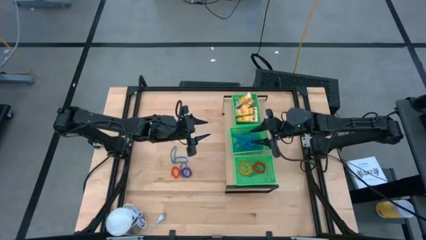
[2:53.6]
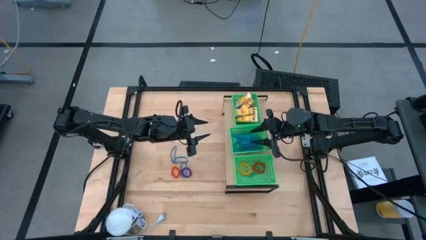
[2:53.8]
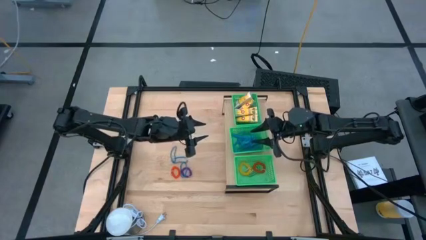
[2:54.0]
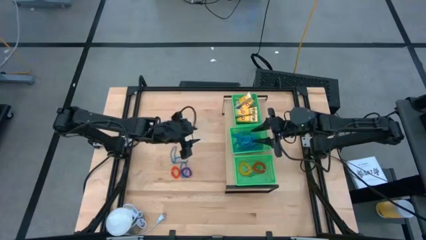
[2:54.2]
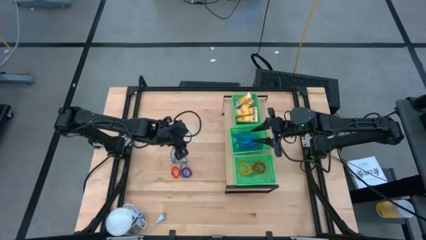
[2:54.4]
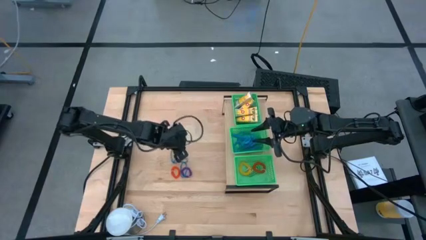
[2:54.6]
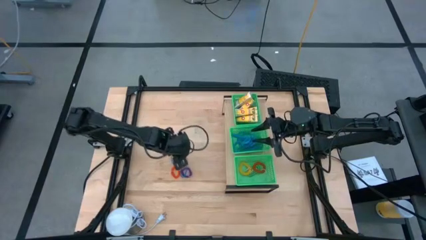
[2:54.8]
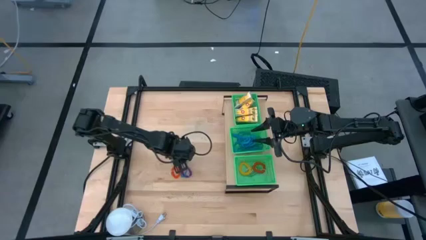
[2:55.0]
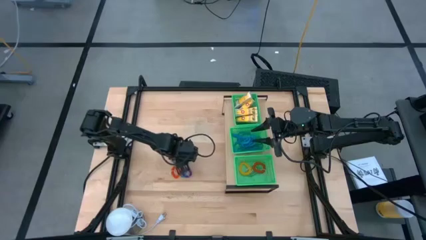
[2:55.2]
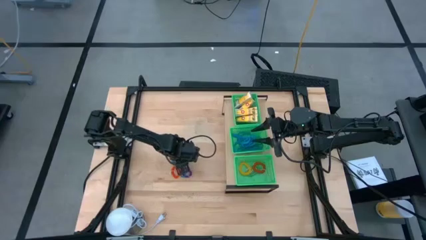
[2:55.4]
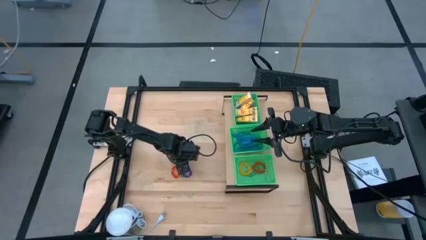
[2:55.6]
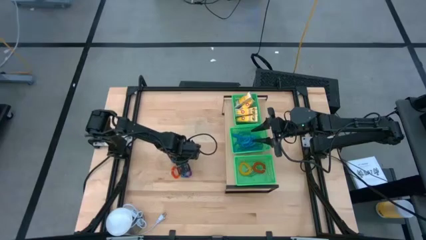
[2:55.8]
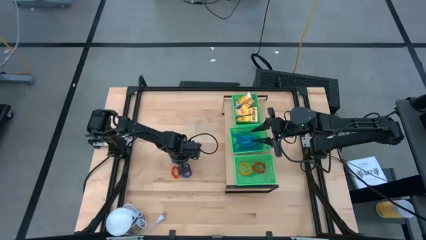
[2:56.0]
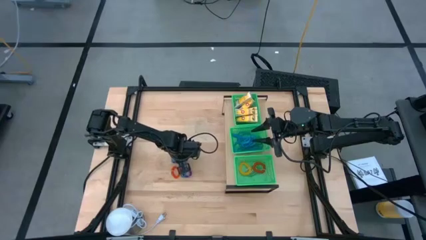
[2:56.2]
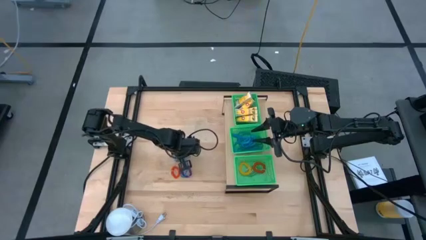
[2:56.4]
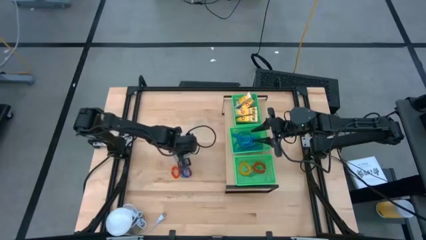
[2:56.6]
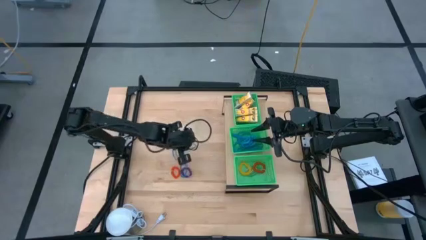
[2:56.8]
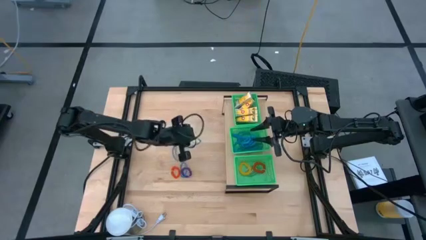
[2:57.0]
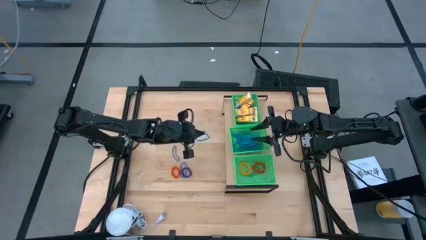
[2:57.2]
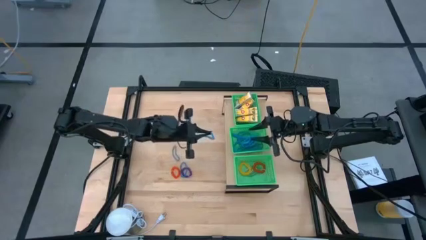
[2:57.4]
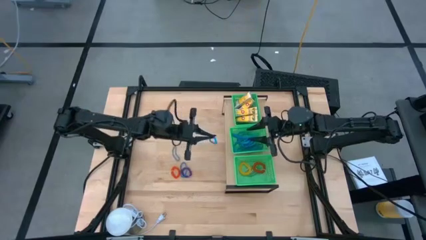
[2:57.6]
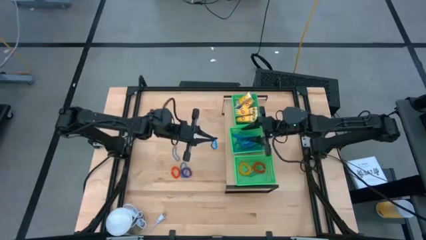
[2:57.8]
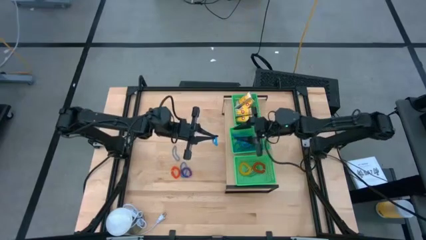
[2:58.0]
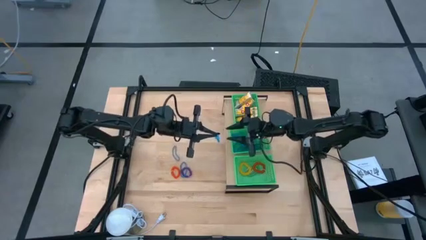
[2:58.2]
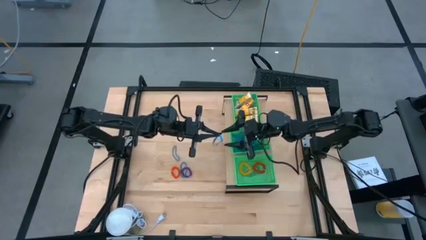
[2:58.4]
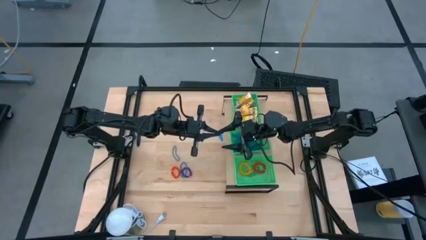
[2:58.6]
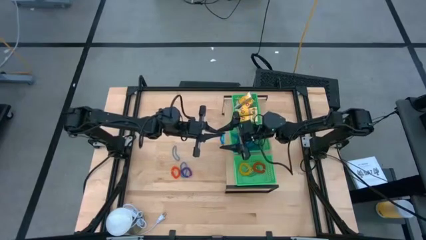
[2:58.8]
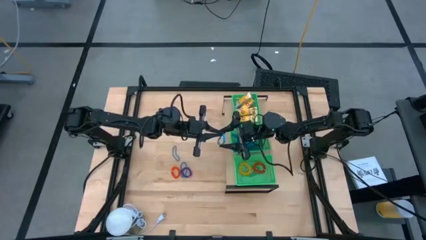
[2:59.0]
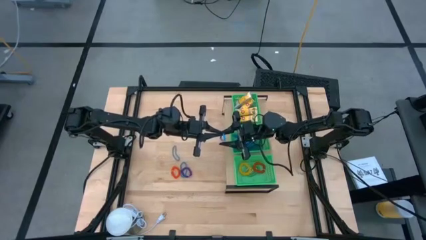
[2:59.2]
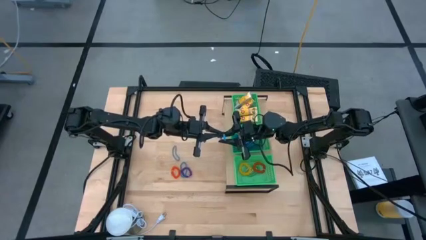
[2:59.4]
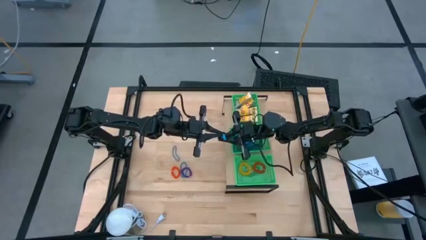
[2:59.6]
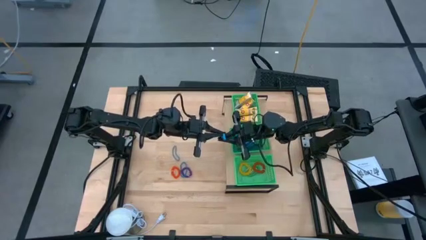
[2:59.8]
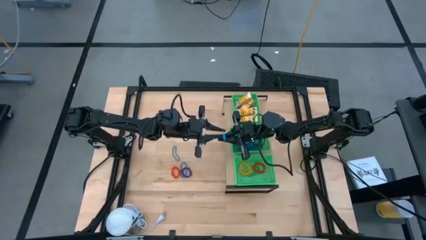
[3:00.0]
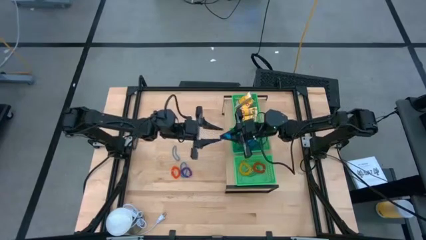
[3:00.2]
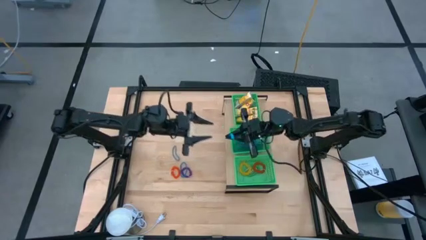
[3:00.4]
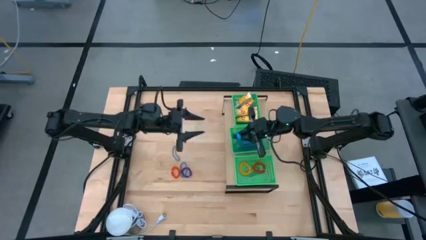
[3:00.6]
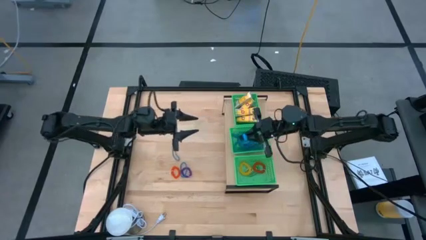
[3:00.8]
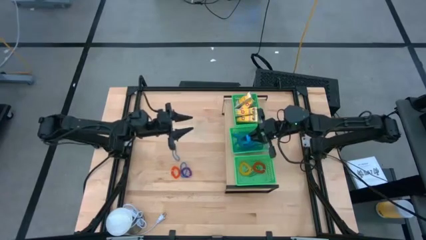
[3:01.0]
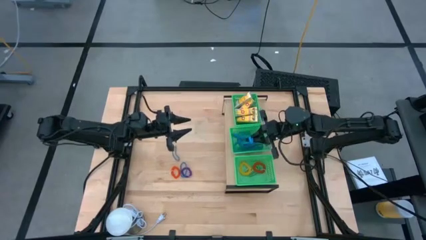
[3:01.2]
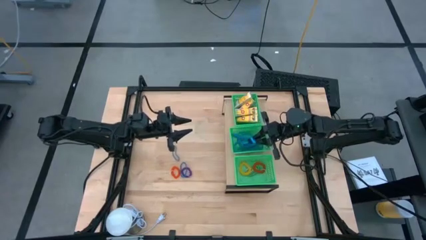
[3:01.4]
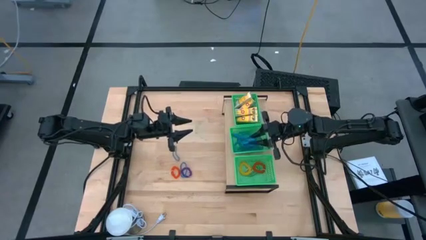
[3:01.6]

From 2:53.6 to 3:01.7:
Task: Pick & Place Office Desk Supplies
Put the blue rubber band into the middle green bin

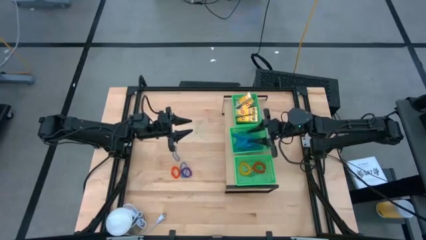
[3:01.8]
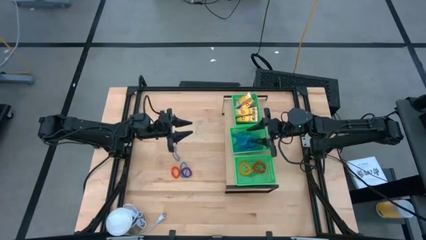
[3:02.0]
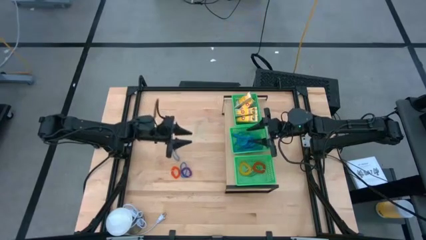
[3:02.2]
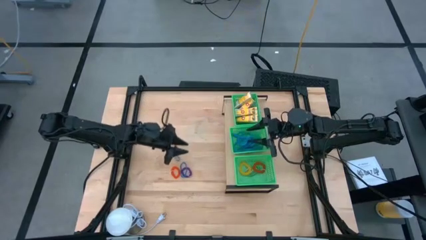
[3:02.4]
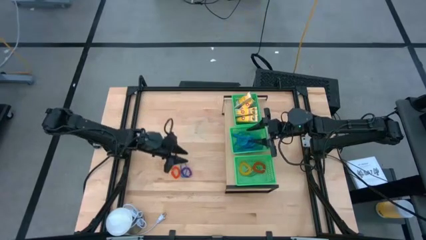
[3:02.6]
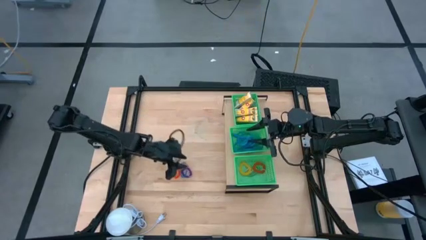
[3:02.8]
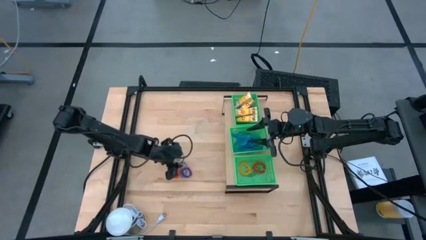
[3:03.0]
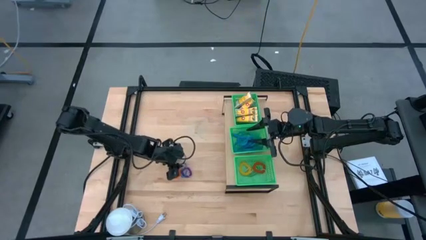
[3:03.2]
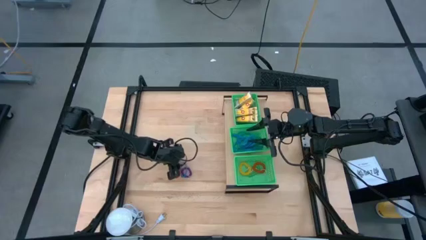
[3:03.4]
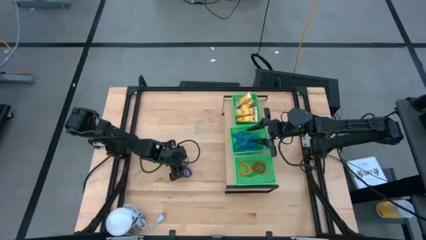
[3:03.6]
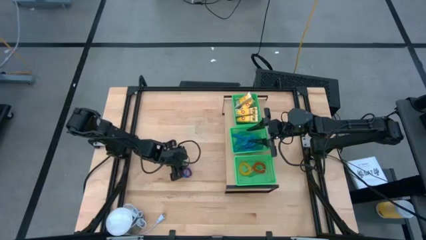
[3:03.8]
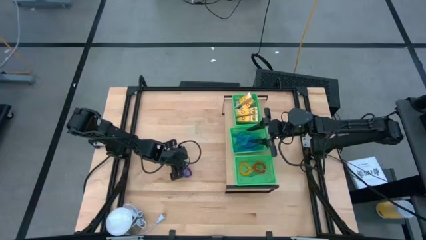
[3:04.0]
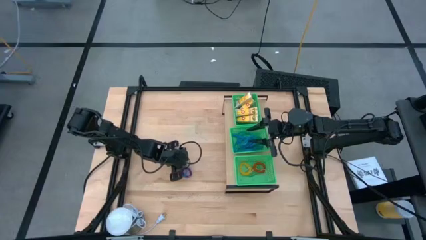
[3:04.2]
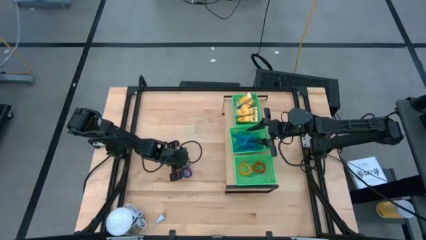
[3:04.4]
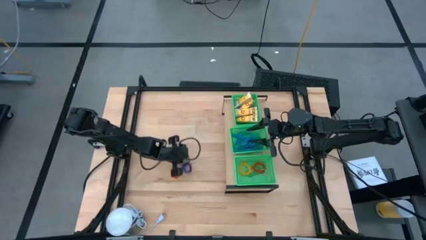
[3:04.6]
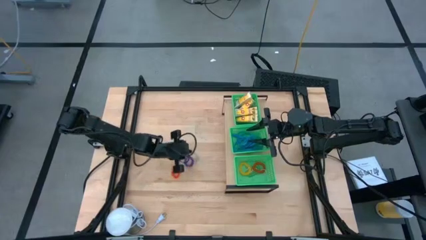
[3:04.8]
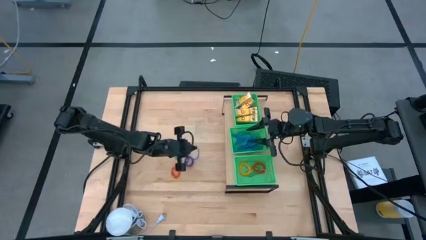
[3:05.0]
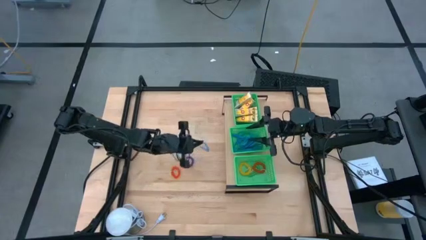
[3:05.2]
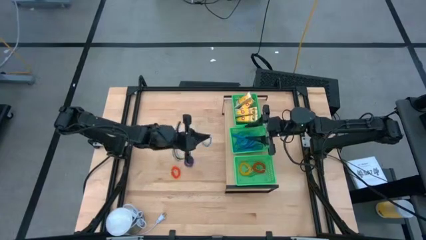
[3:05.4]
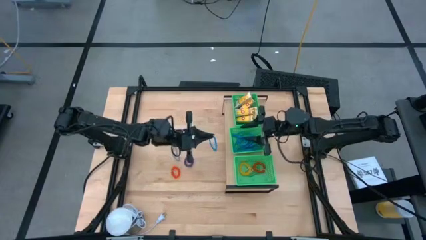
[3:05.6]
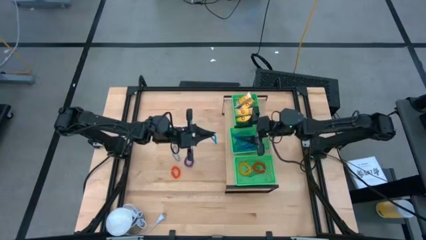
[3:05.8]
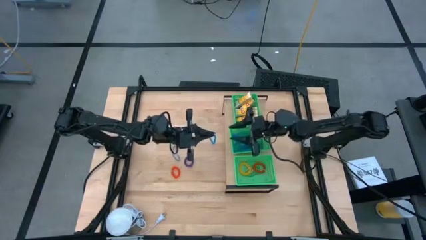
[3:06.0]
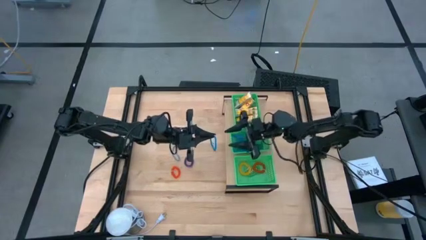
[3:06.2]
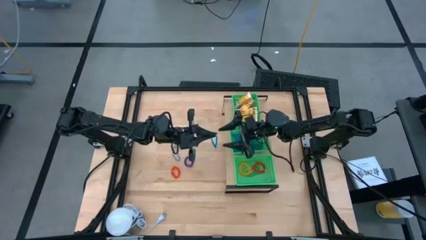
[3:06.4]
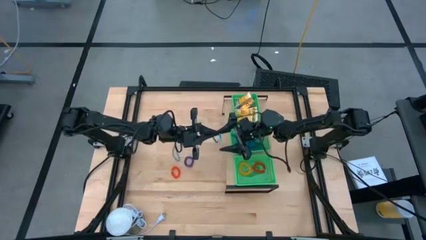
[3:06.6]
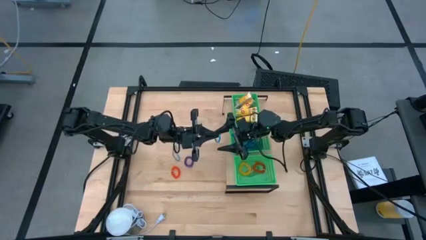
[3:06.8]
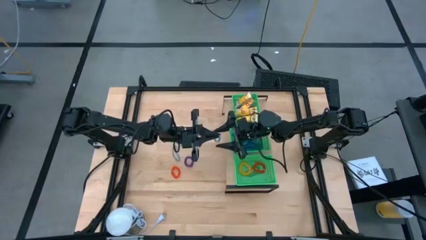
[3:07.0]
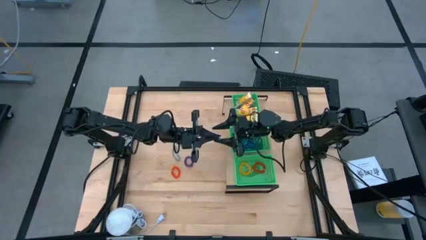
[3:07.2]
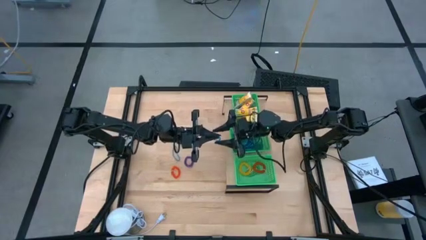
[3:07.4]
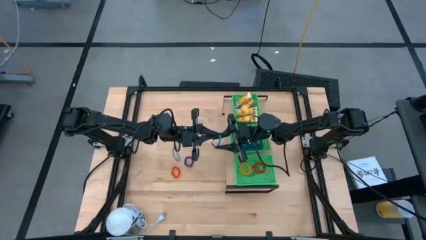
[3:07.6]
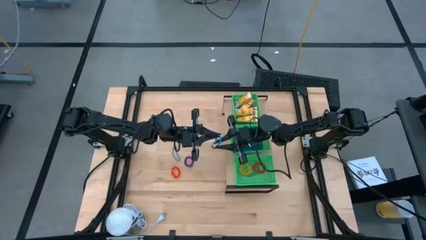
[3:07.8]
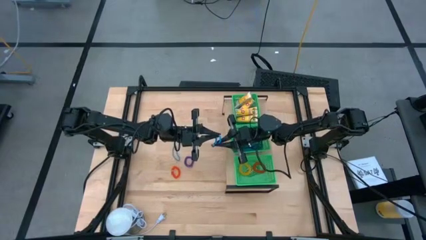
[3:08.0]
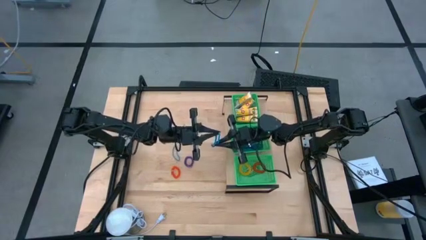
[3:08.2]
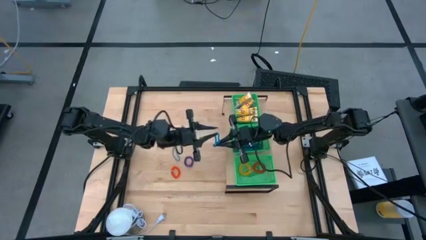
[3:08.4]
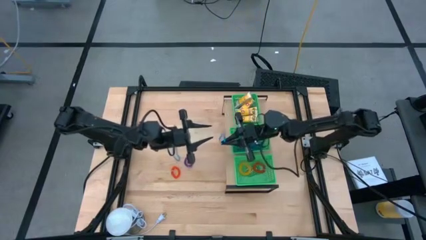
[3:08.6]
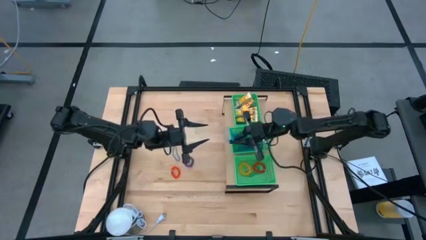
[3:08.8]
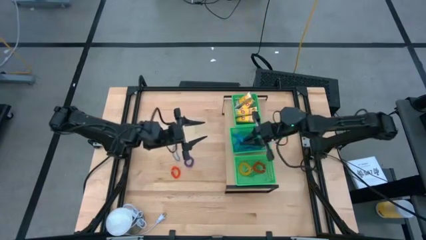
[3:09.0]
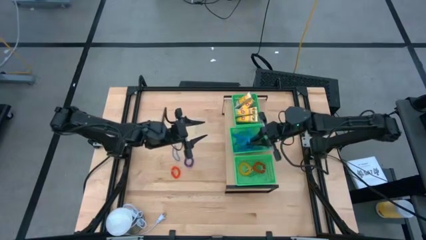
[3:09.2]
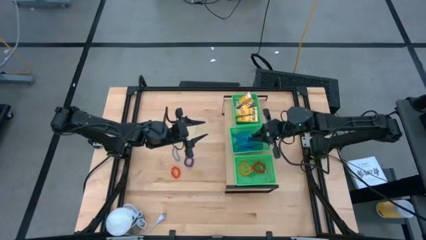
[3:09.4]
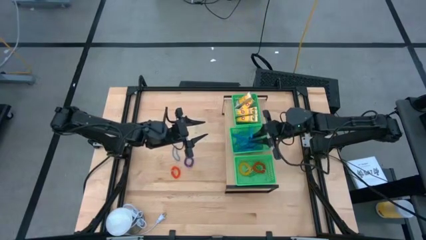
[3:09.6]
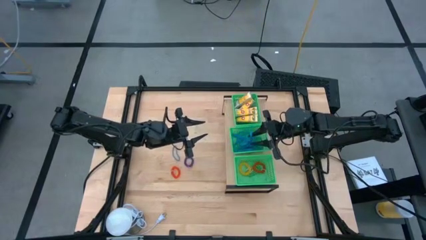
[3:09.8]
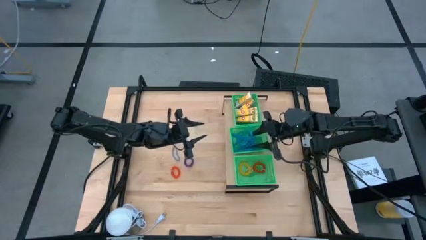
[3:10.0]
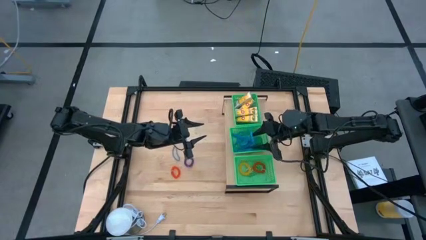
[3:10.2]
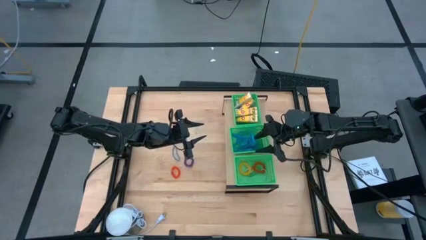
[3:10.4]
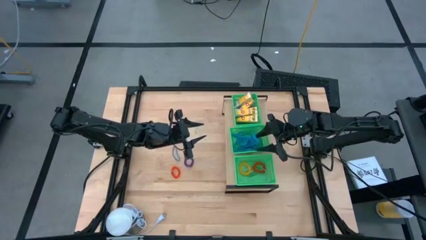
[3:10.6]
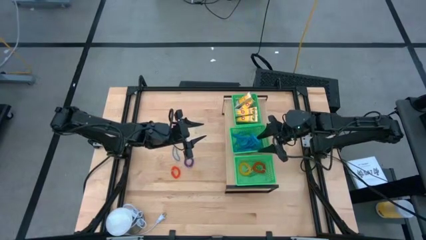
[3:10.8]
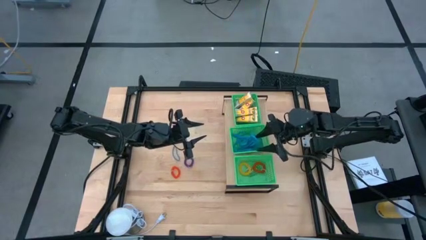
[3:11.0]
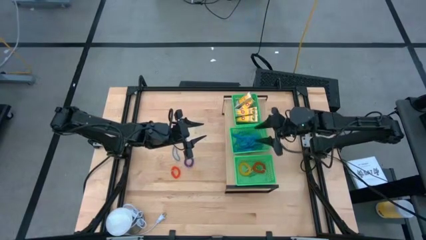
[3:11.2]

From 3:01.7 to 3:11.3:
Put the blue rubber band into the middle green bin
